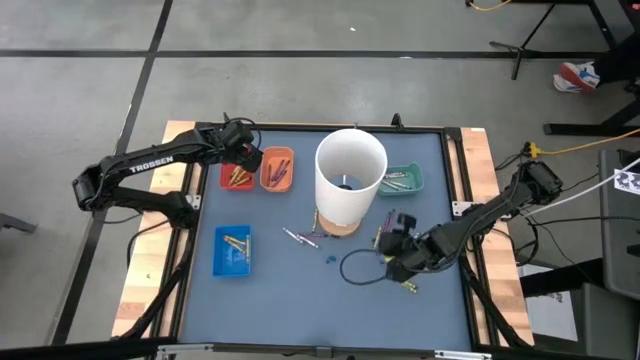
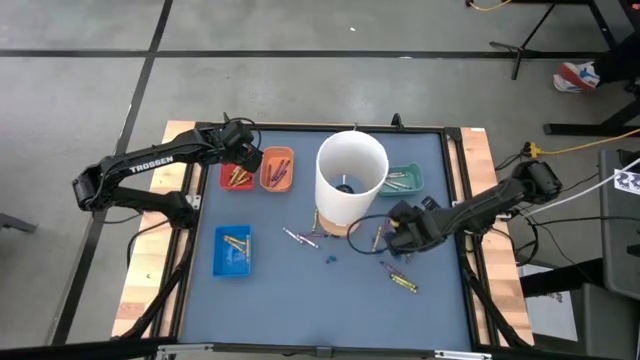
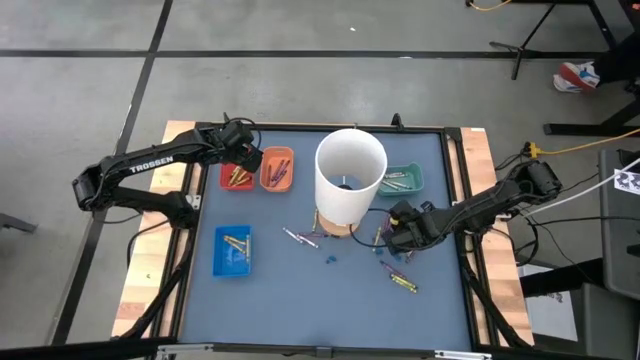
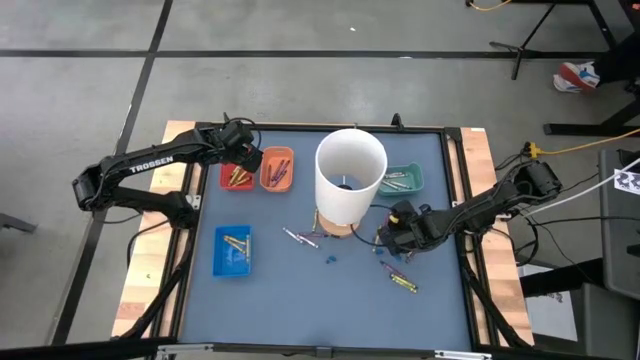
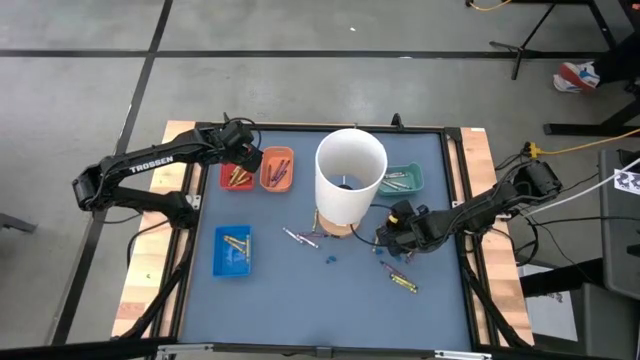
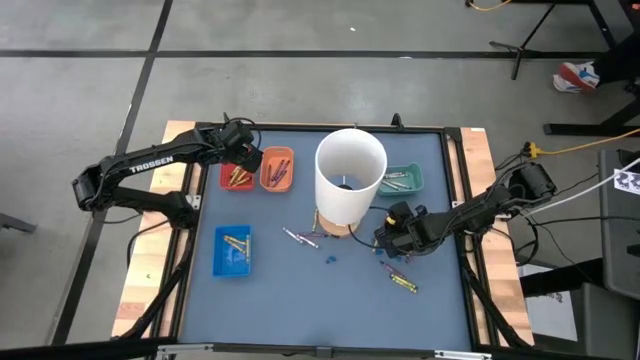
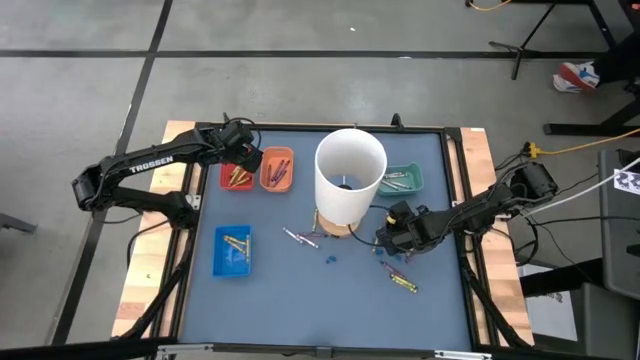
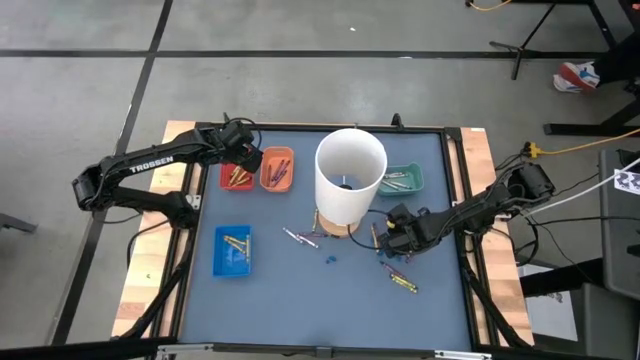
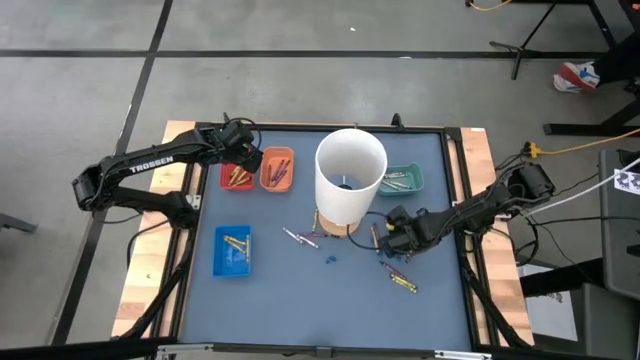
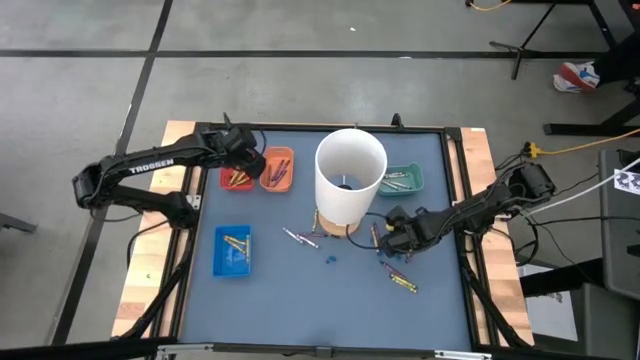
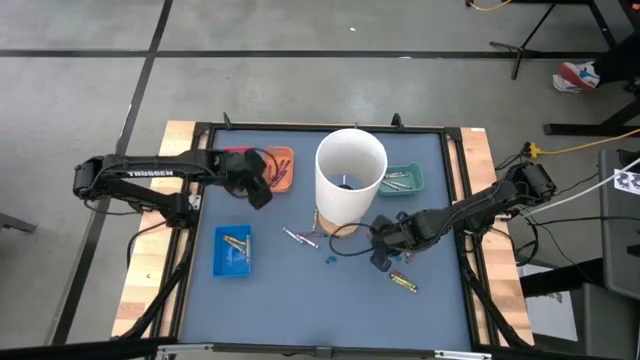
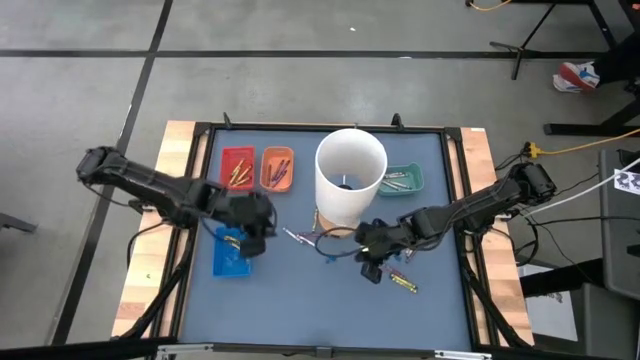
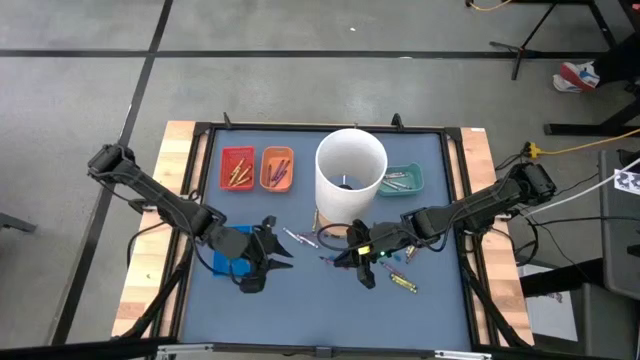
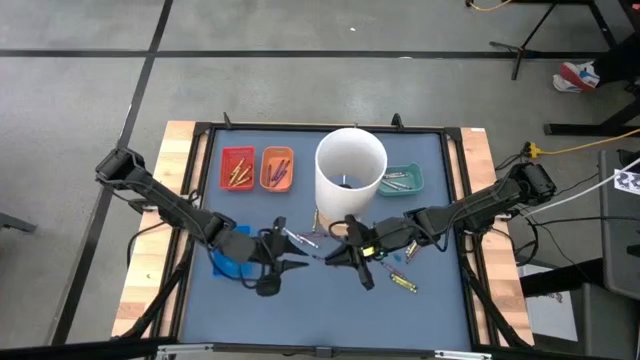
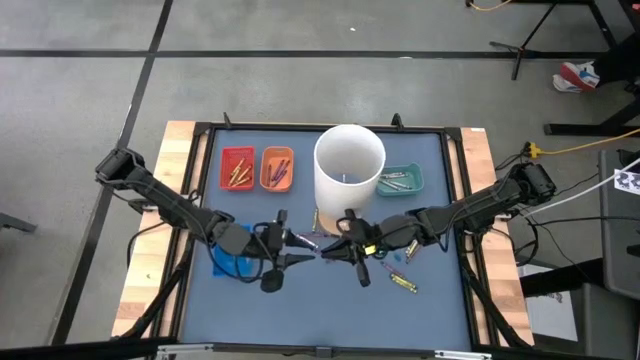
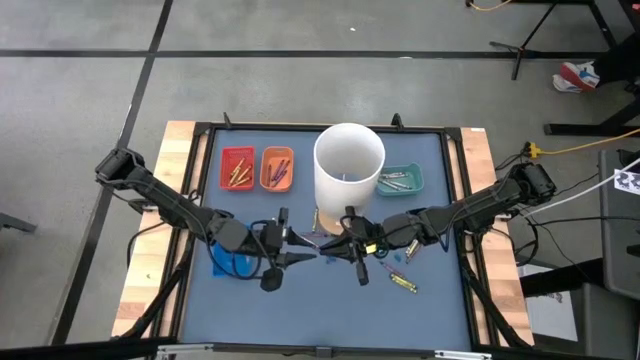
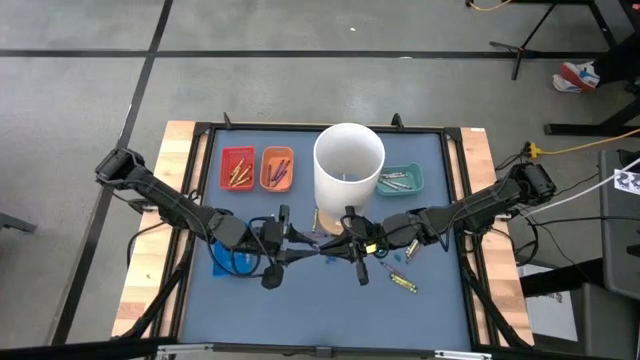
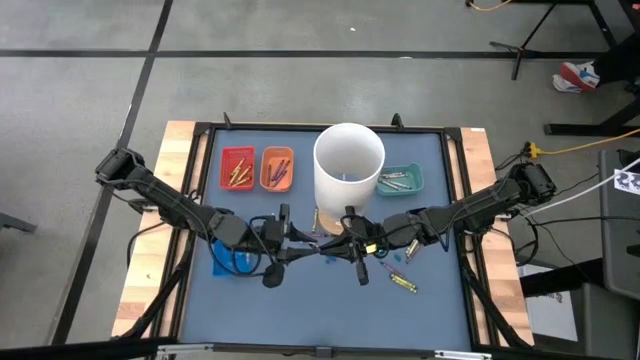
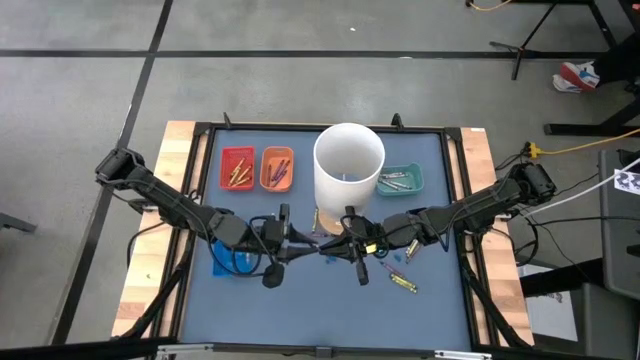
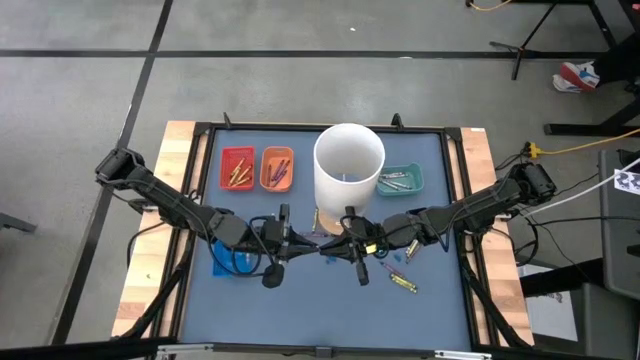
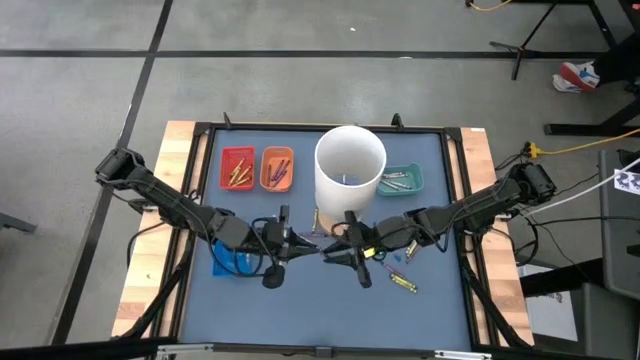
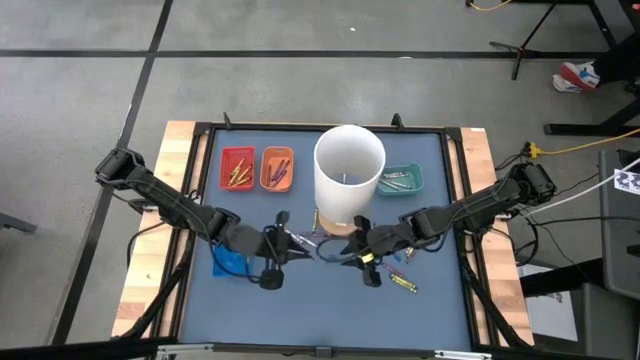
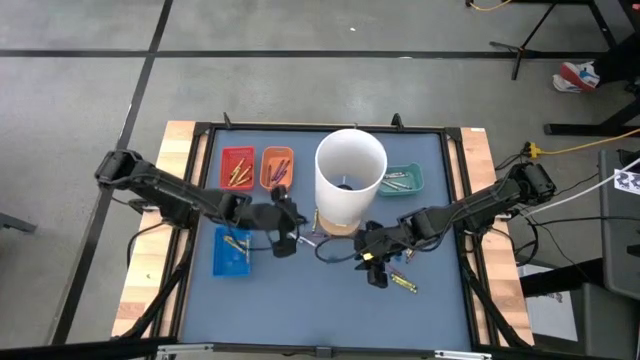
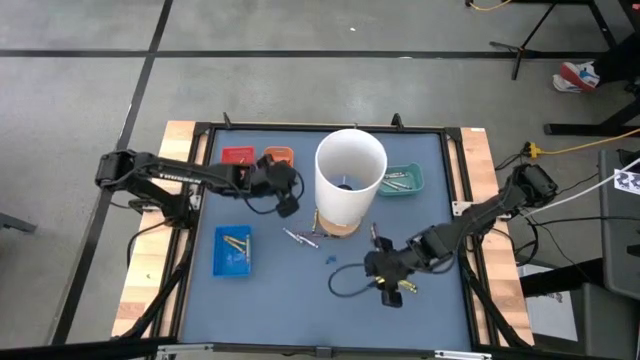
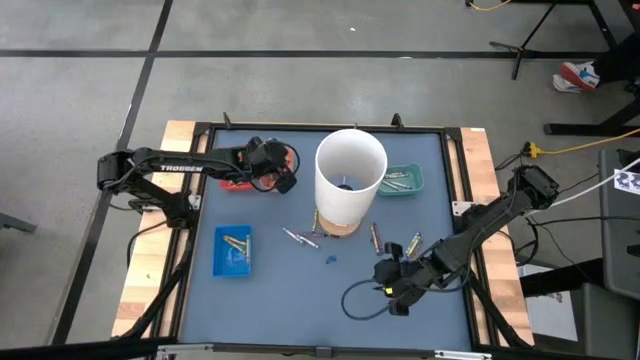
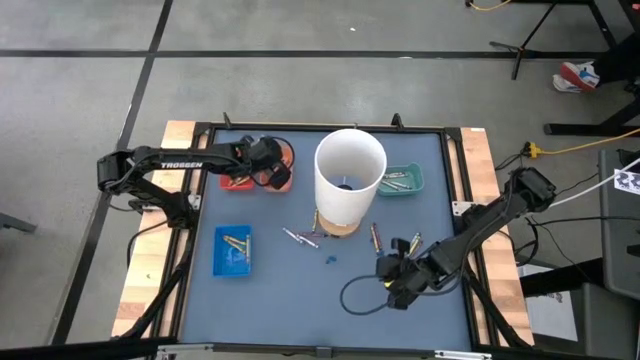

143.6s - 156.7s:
Task: Sort crayons
Put the violet crayon into the green bin

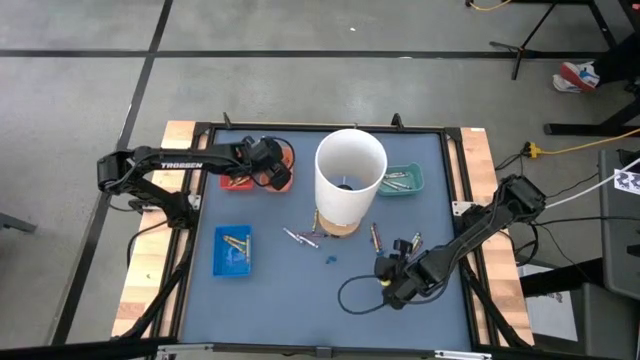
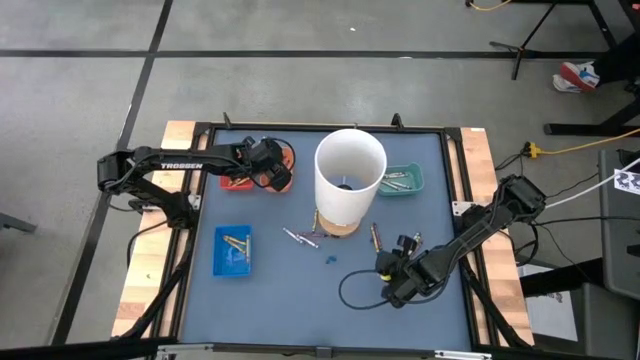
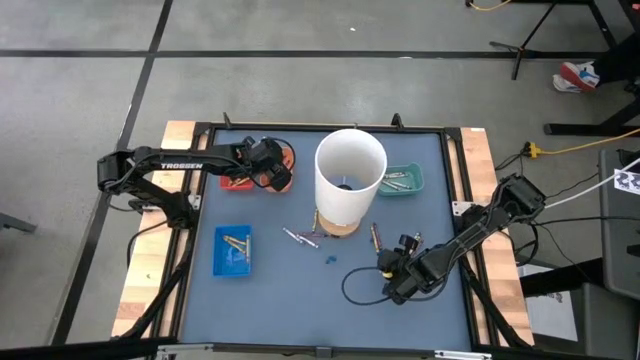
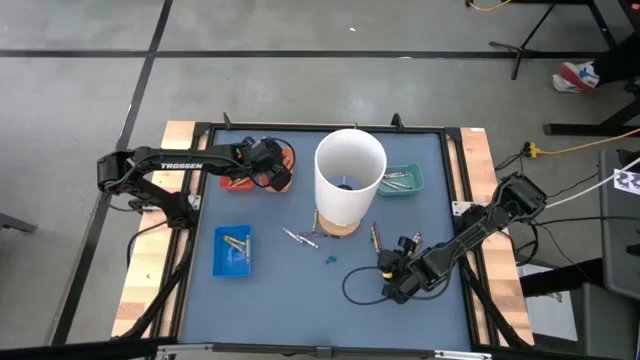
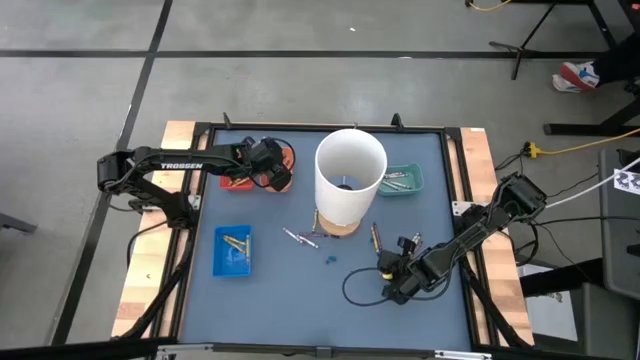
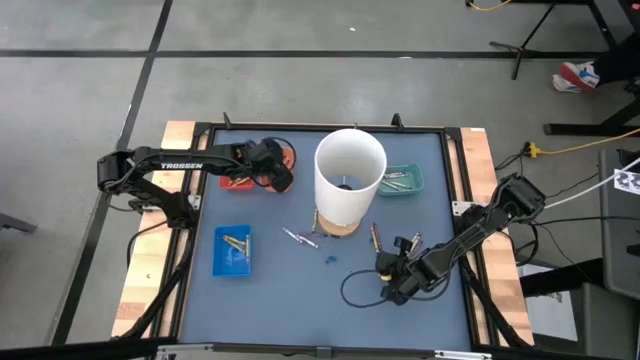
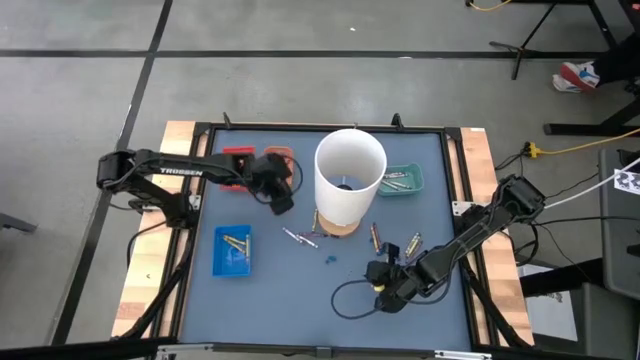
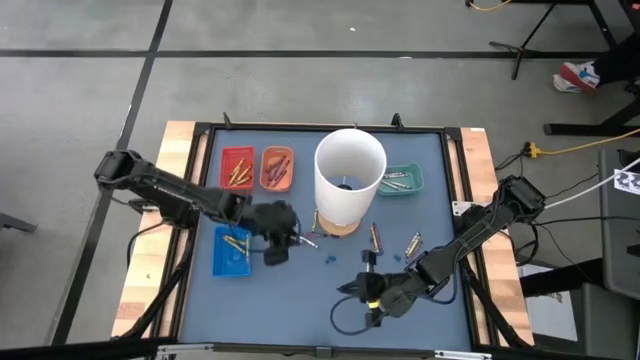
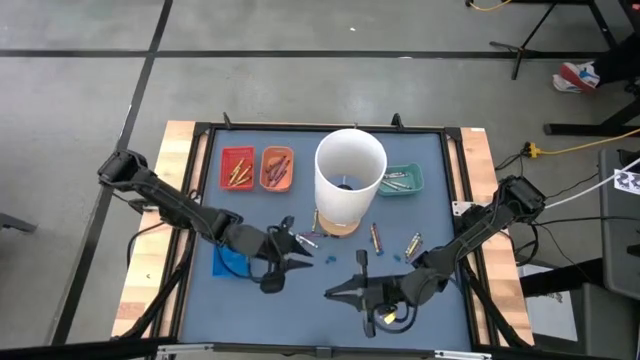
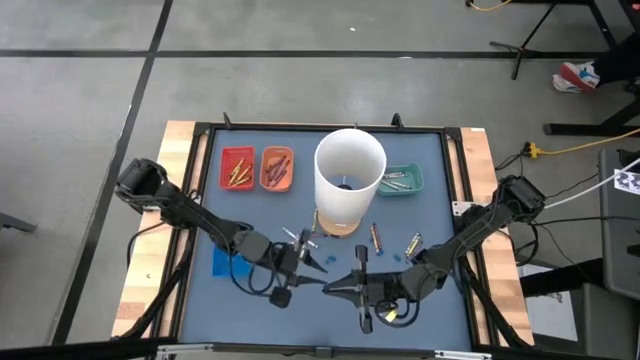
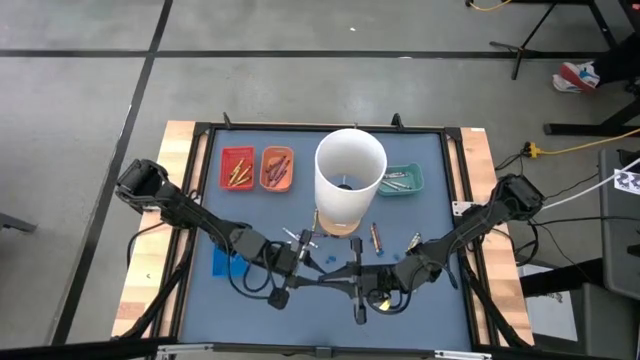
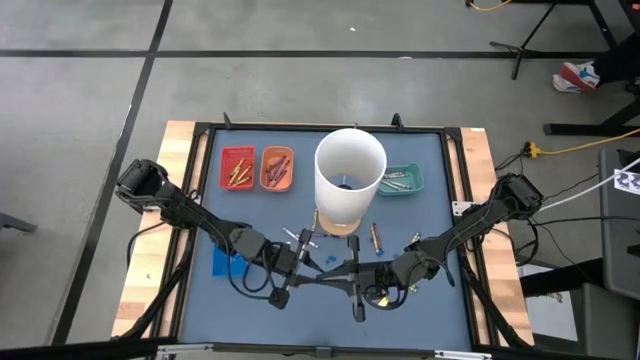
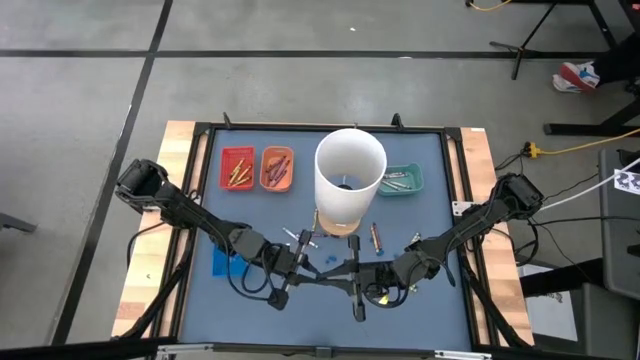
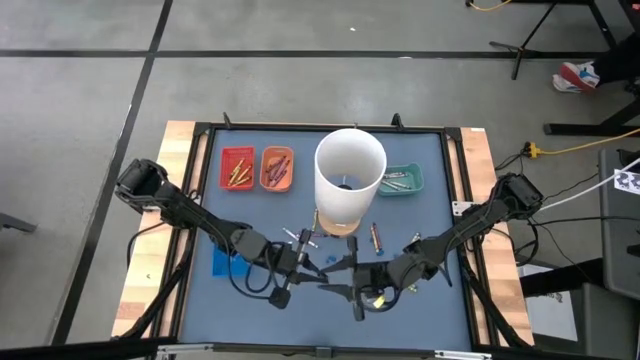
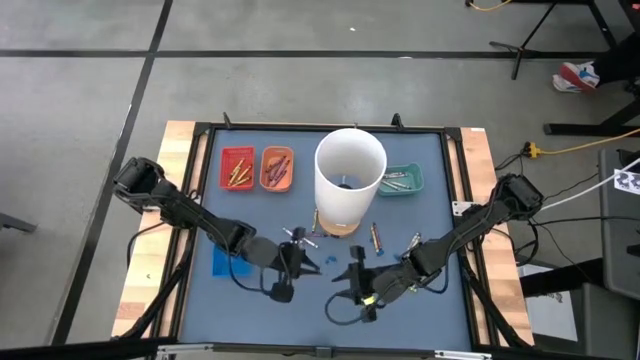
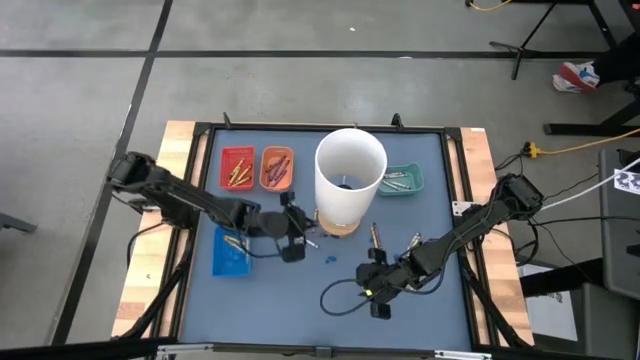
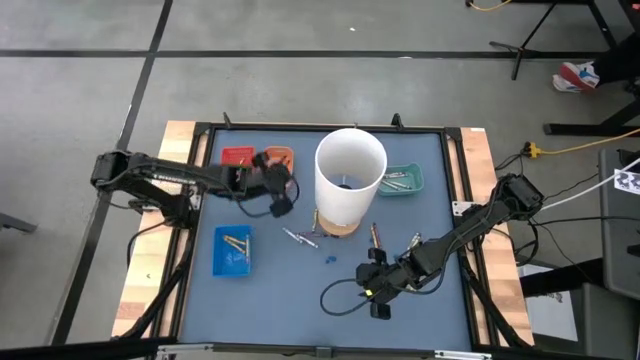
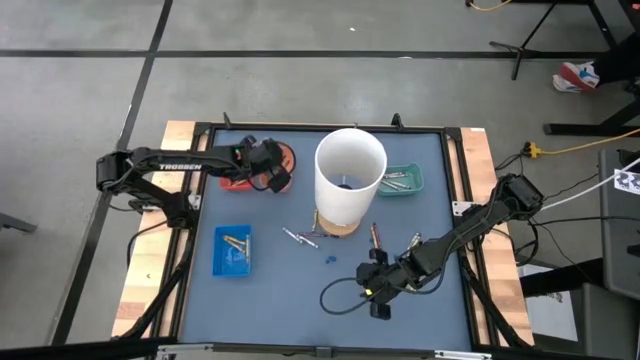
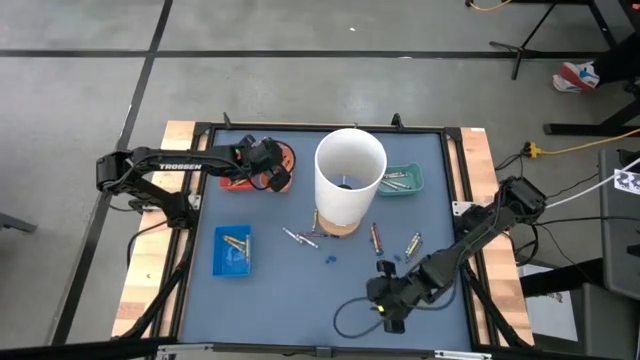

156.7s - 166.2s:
Put the violet crayon into the blue bin
